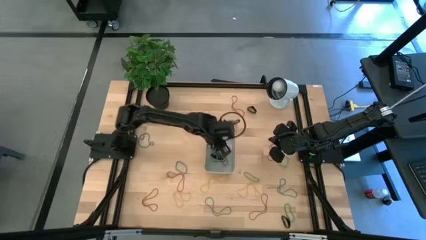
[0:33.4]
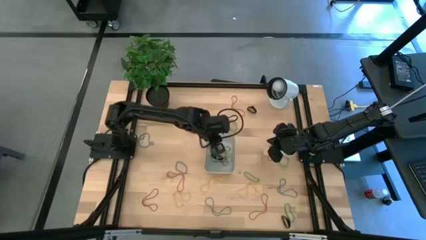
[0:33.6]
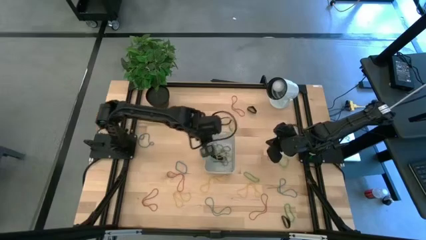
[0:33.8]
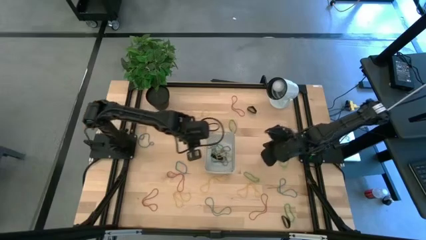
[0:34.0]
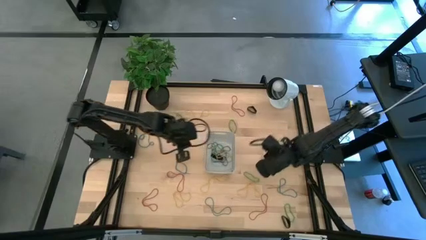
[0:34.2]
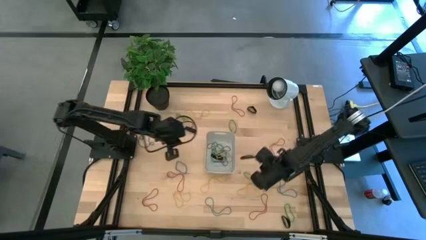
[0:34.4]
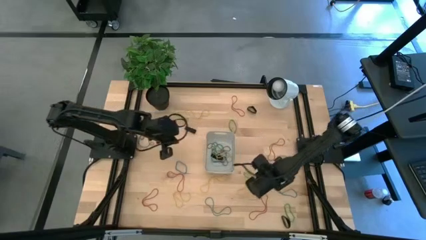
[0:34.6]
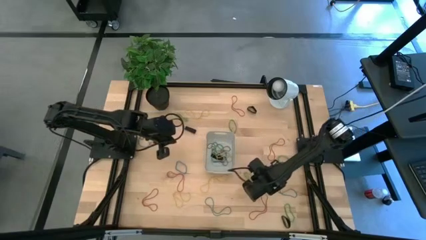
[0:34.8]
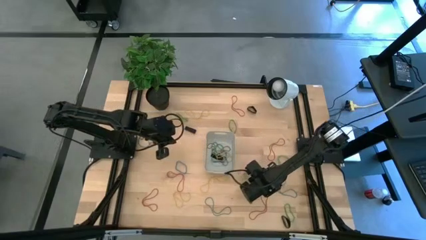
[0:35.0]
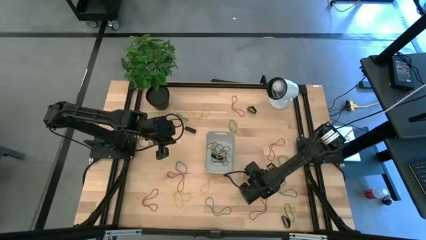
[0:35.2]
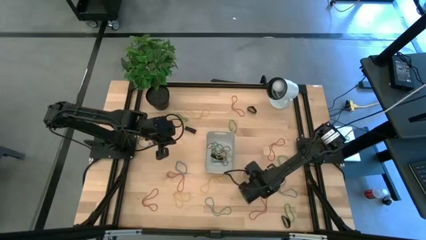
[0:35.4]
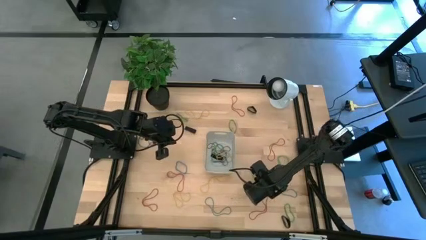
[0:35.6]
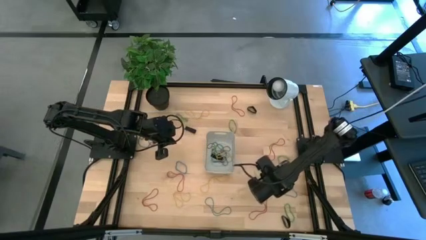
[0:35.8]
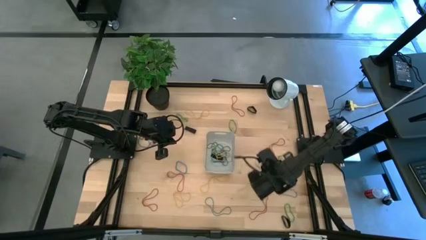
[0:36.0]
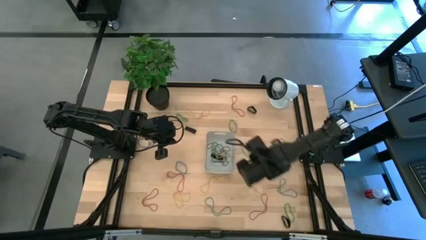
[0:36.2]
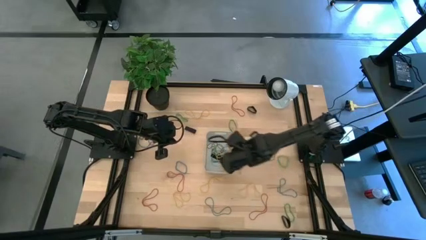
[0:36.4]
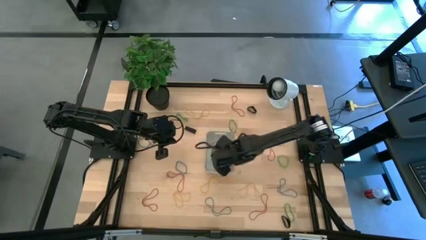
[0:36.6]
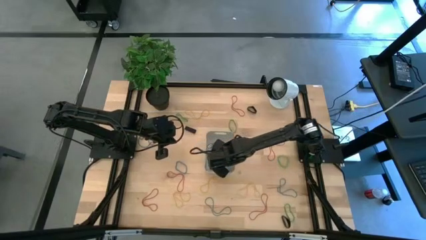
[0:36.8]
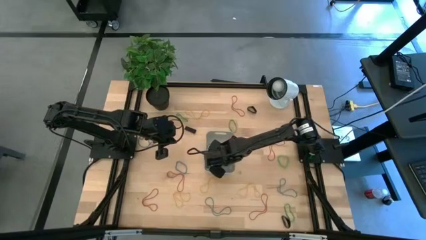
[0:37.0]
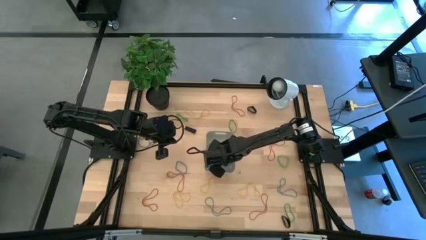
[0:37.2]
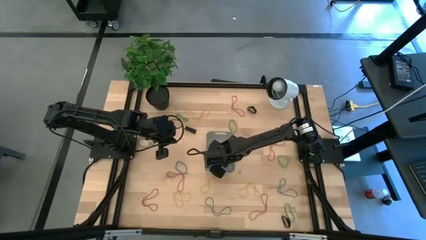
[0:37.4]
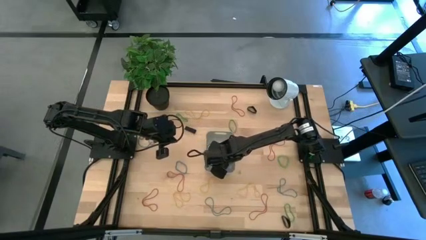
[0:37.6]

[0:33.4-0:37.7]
Task: Pick and place rubber bands into bin
Put the green rubber band into the gray bin

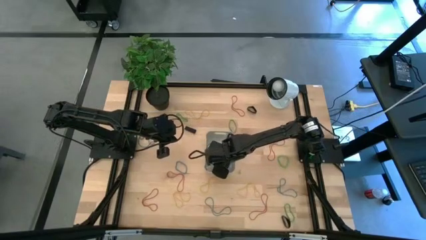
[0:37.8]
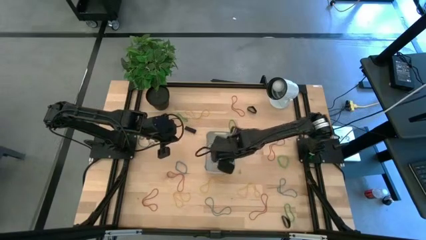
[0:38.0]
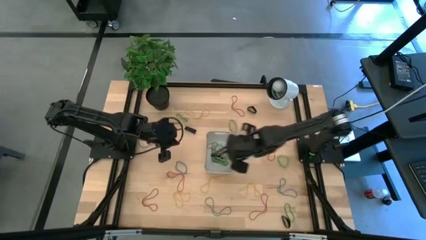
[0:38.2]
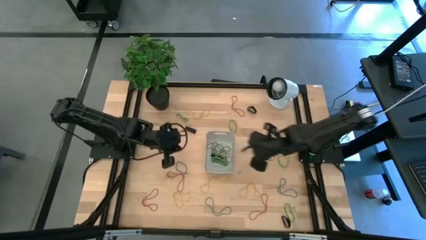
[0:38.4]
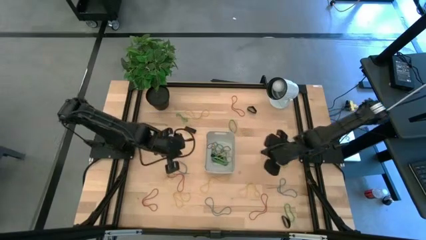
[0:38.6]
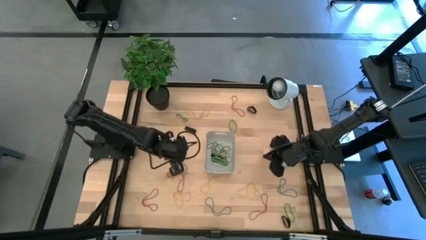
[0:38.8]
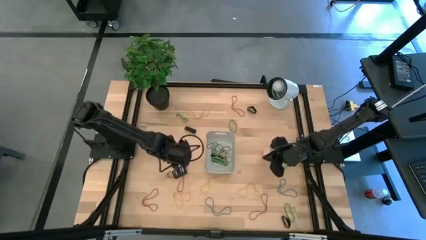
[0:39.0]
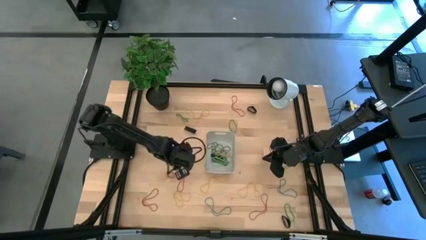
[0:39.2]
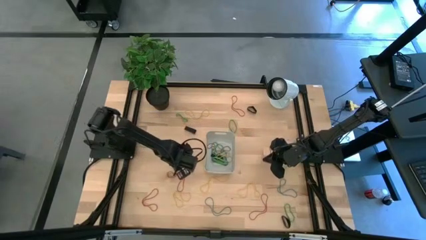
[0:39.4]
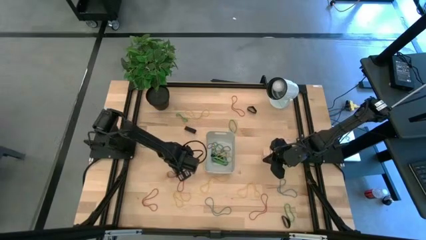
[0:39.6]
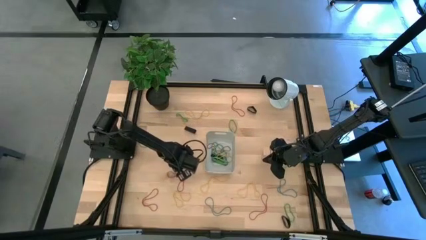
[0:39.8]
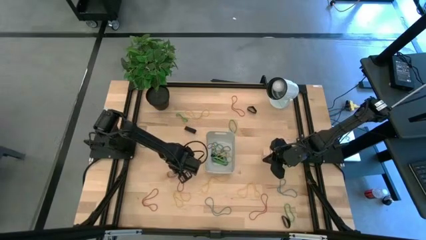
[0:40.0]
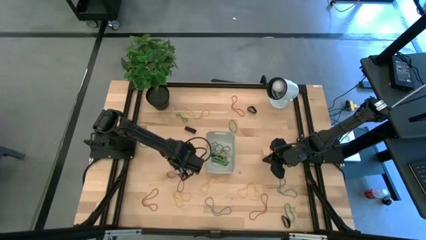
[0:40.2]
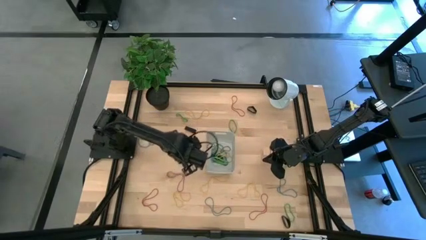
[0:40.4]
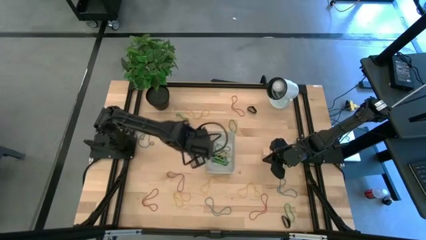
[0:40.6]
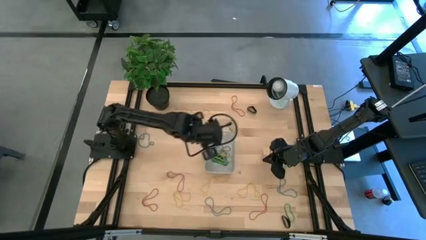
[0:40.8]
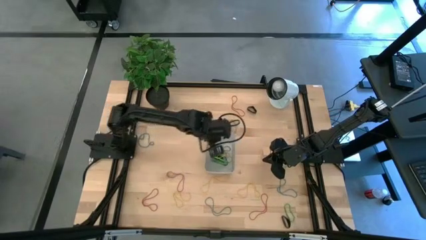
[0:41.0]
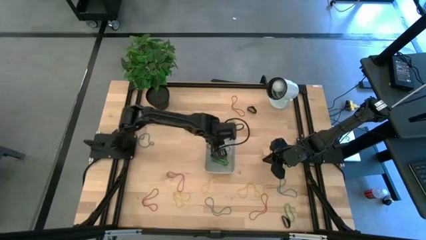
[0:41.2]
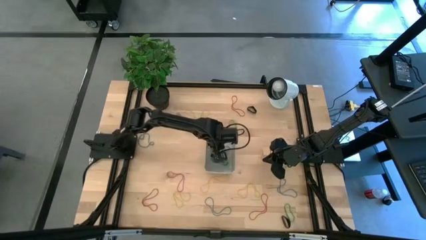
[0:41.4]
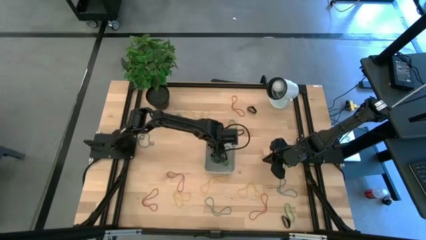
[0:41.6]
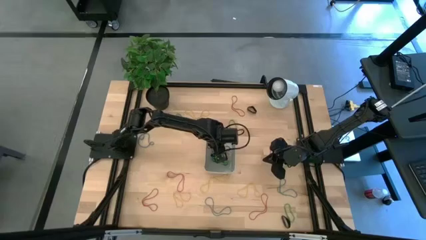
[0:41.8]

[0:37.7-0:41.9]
Put the blue rubber band into the gray bin

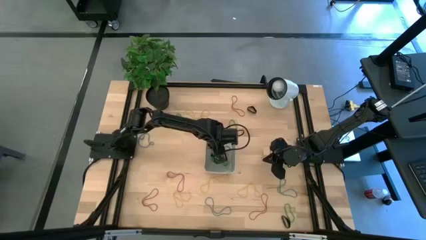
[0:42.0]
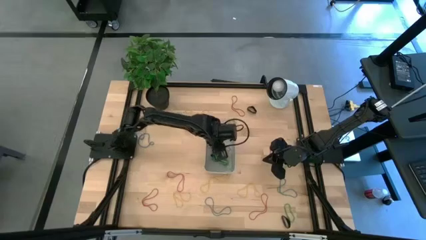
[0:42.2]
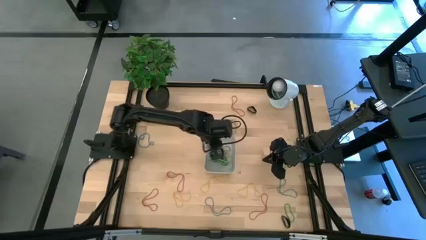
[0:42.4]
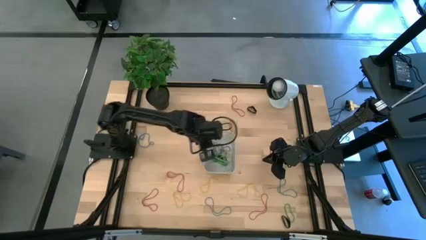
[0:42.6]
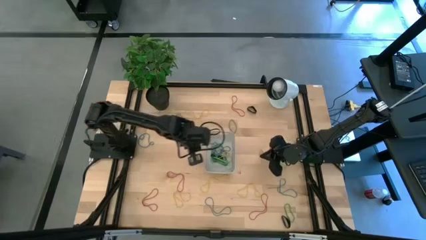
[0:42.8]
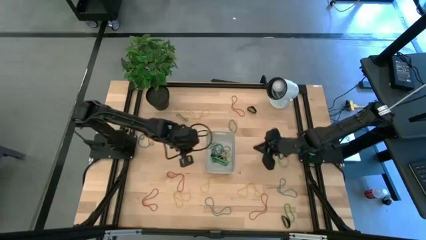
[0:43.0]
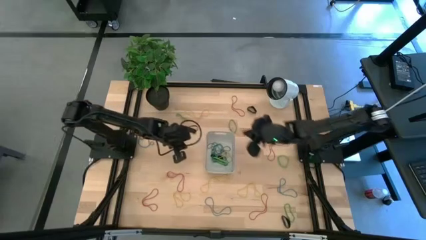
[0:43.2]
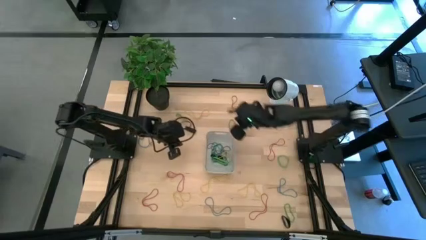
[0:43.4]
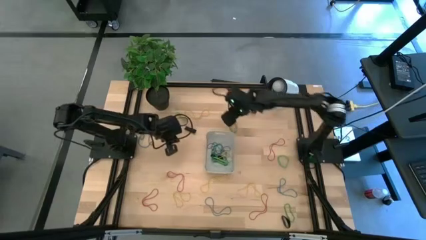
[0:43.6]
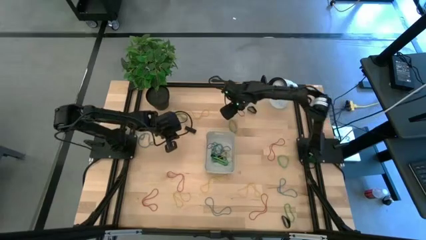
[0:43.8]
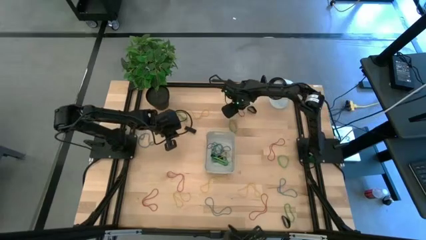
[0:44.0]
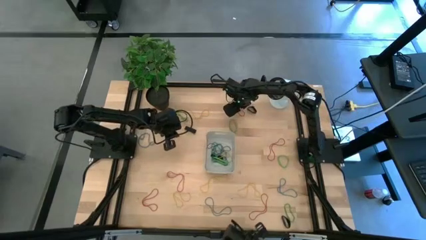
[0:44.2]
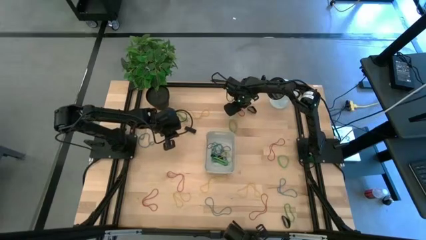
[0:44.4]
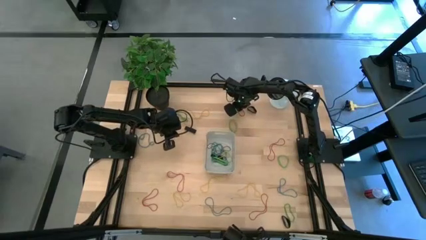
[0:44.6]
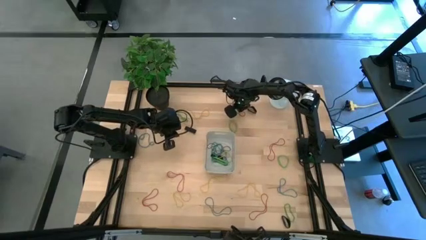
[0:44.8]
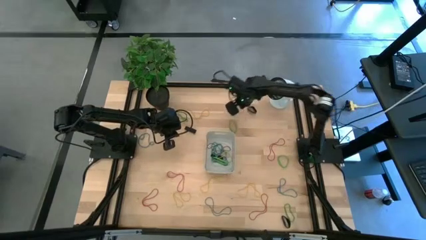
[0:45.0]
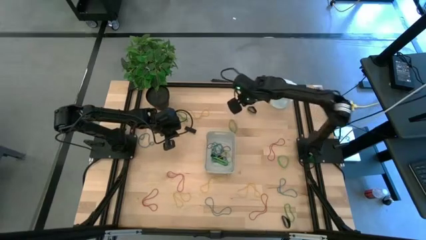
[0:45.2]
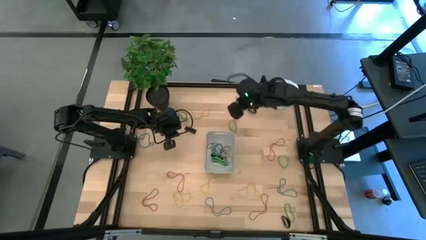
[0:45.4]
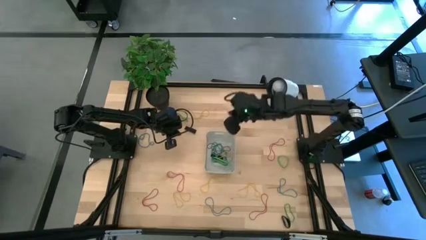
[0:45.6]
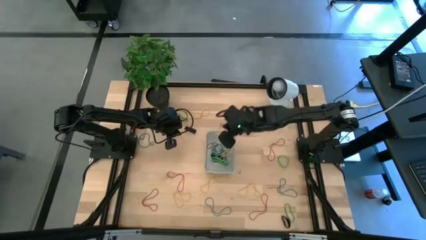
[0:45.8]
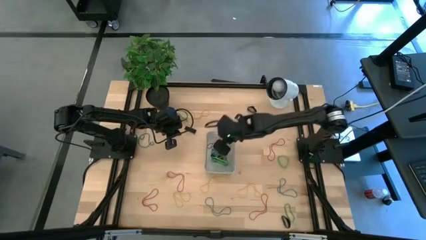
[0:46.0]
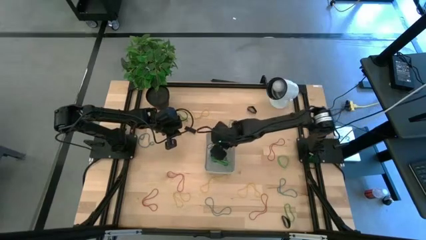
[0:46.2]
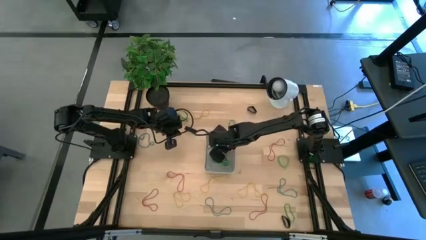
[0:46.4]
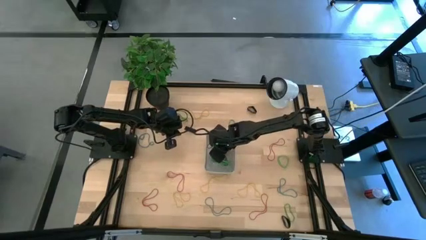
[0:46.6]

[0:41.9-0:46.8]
Put the red rubber band into the gray bin

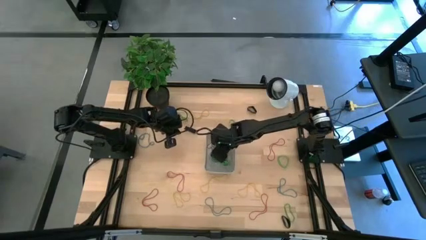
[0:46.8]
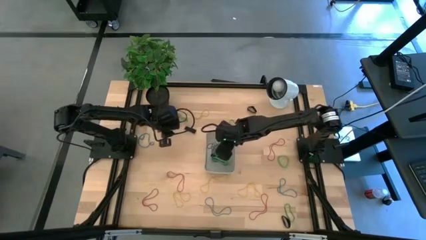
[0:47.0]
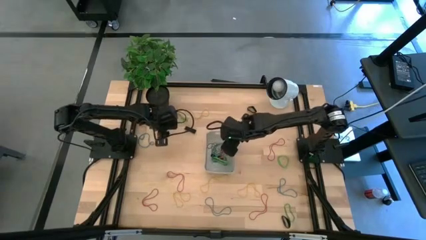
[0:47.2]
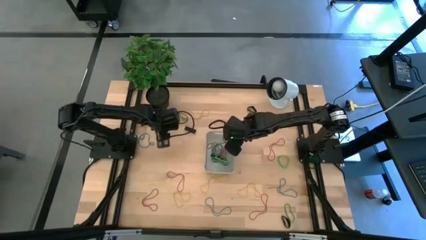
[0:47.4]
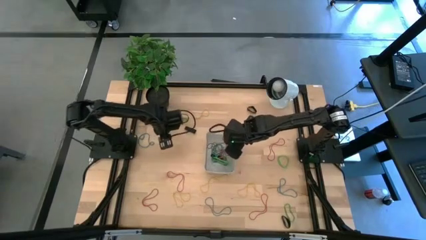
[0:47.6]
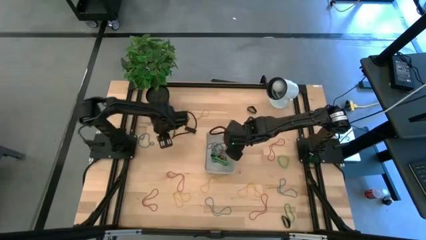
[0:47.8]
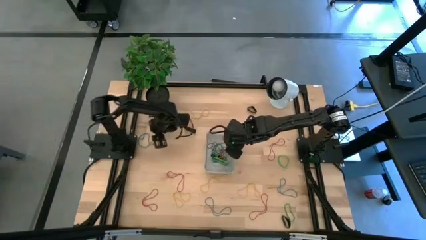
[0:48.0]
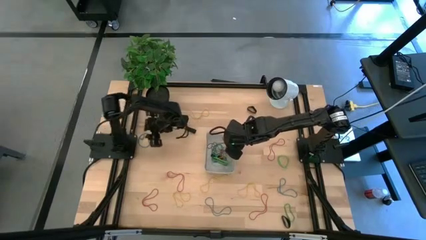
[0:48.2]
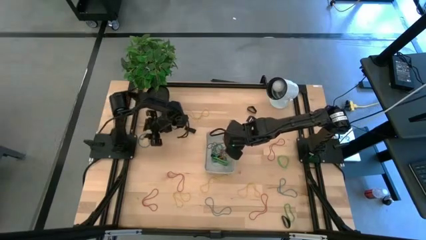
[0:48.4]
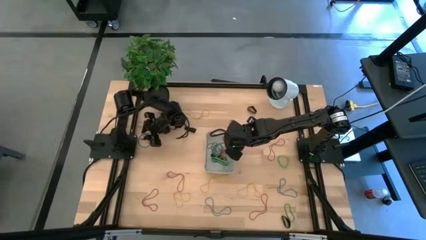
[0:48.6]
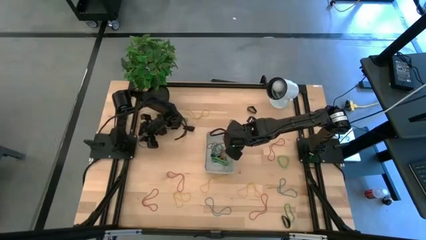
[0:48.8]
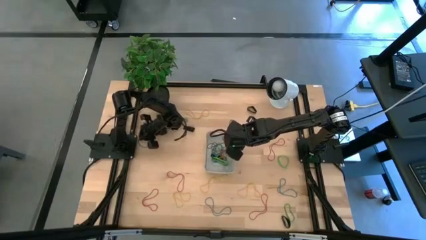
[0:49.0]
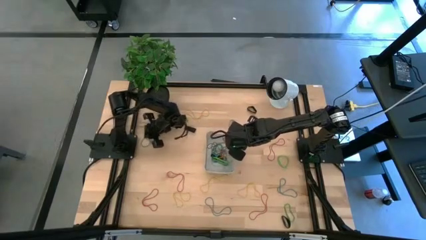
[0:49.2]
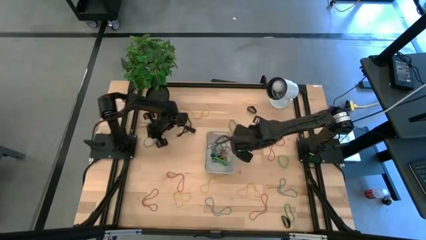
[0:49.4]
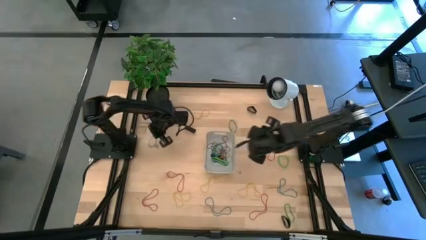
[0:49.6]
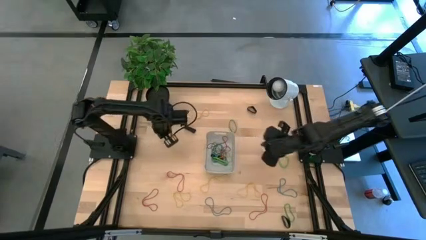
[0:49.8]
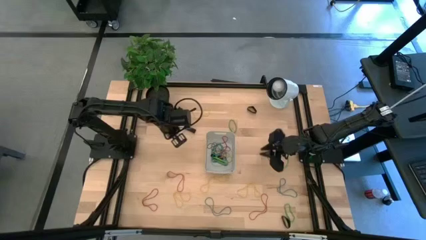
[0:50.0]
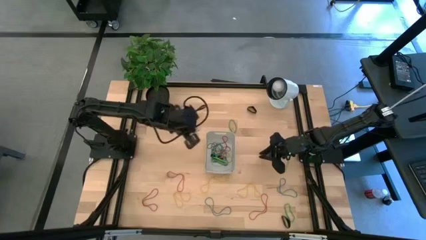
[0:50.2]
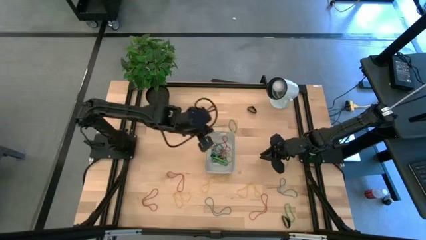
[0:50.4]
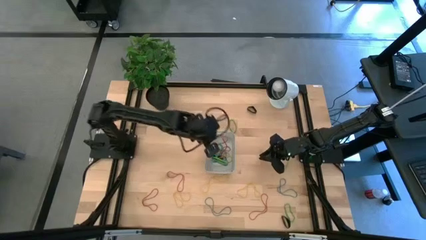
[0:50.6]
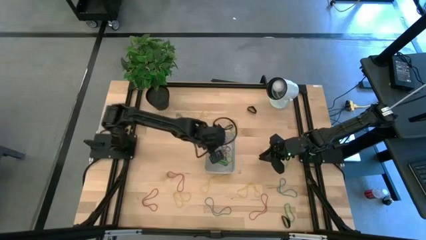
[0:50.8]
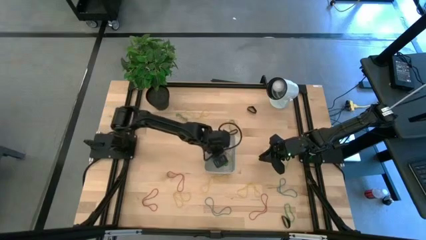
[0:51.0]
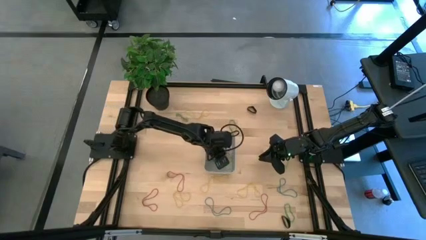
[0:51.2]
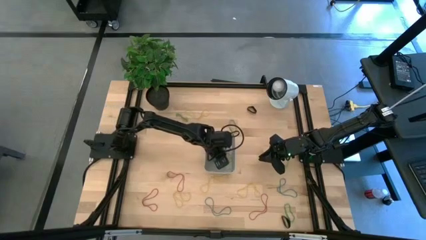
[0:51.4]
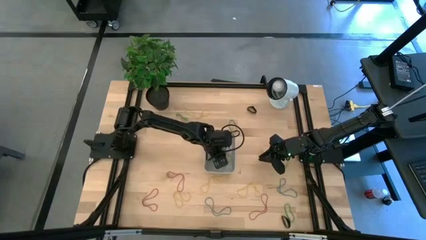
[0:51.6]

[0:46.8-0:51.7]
Put the blue rubber band into the gray bin
